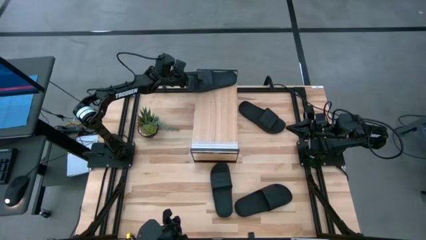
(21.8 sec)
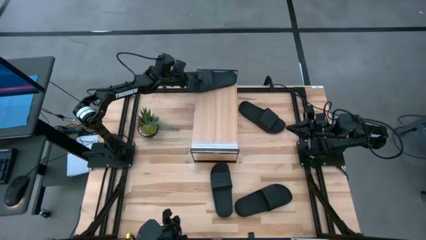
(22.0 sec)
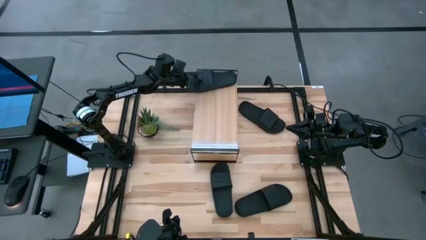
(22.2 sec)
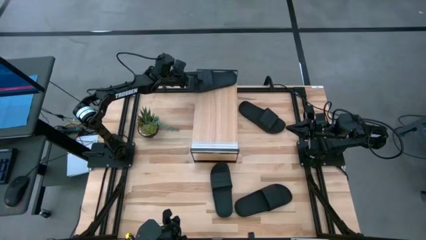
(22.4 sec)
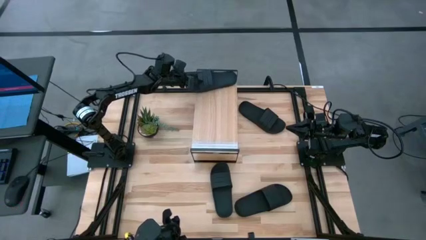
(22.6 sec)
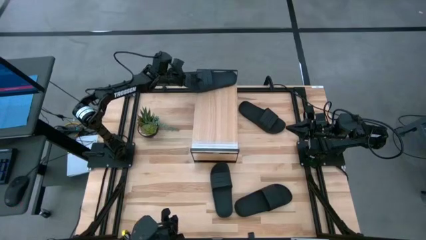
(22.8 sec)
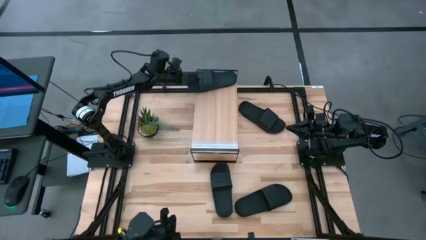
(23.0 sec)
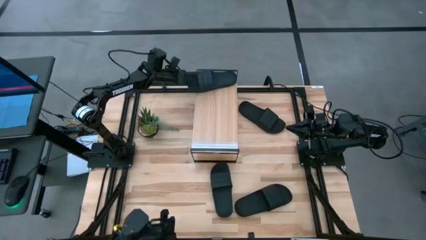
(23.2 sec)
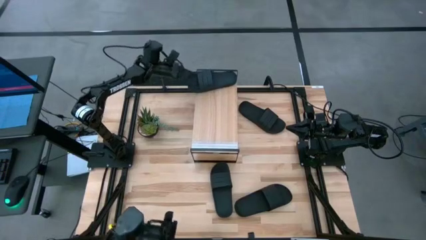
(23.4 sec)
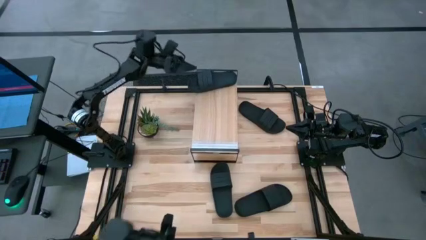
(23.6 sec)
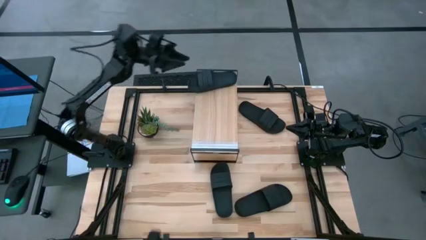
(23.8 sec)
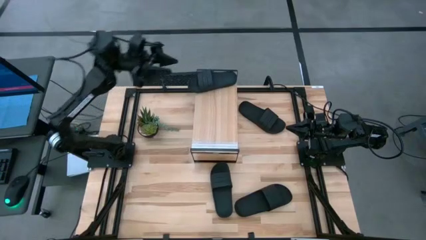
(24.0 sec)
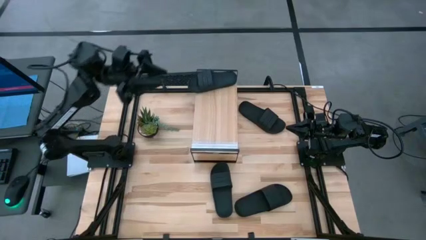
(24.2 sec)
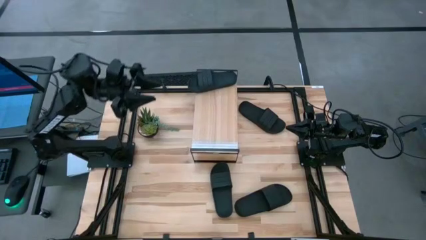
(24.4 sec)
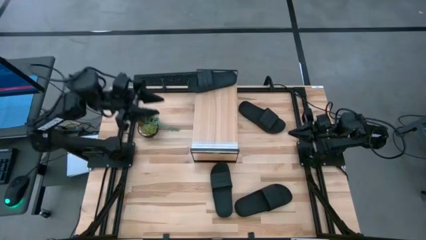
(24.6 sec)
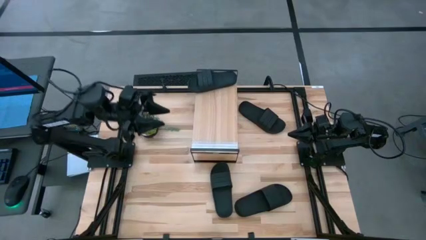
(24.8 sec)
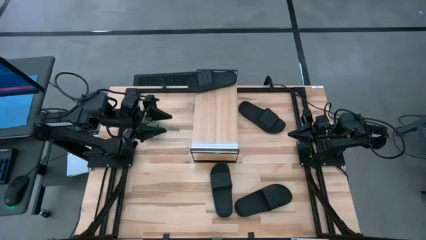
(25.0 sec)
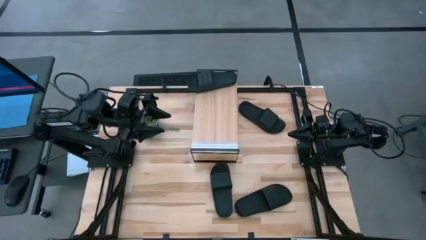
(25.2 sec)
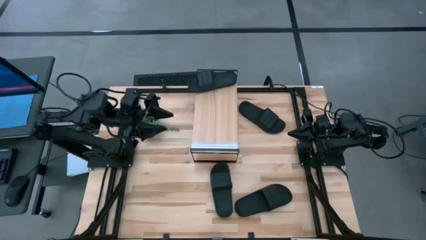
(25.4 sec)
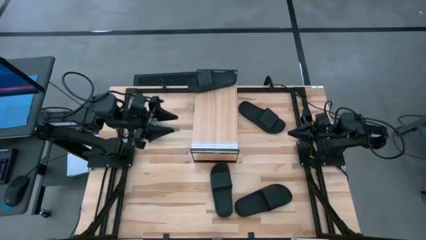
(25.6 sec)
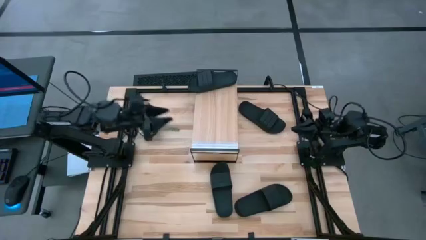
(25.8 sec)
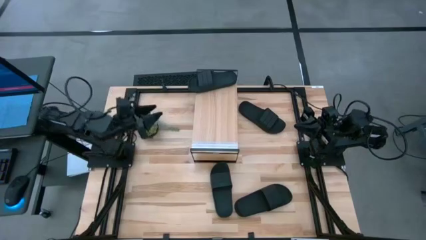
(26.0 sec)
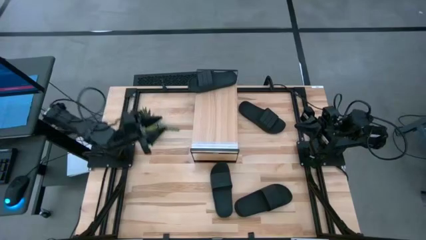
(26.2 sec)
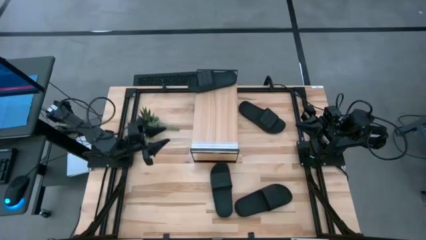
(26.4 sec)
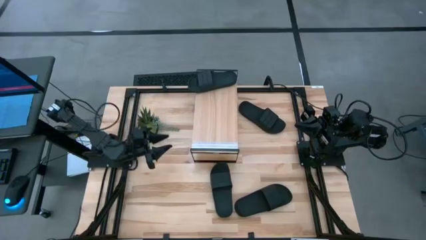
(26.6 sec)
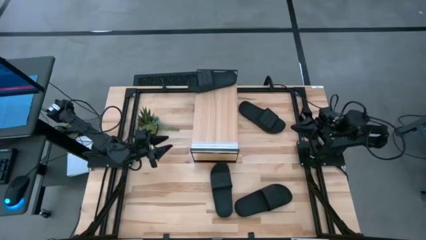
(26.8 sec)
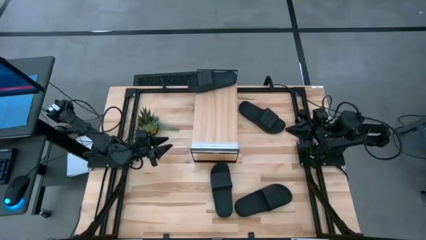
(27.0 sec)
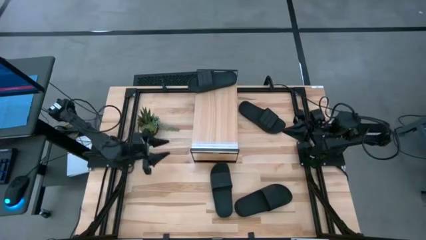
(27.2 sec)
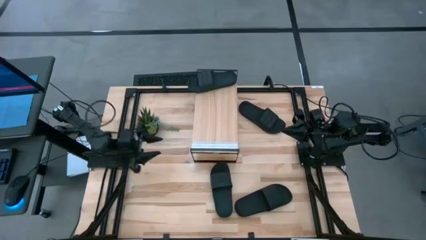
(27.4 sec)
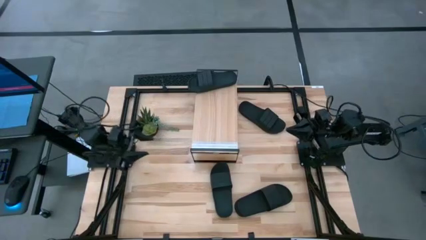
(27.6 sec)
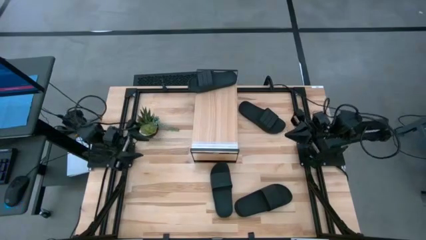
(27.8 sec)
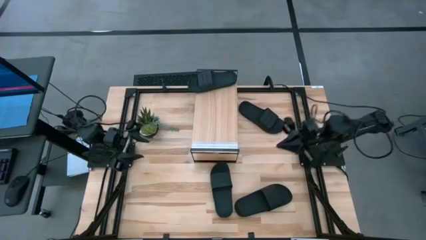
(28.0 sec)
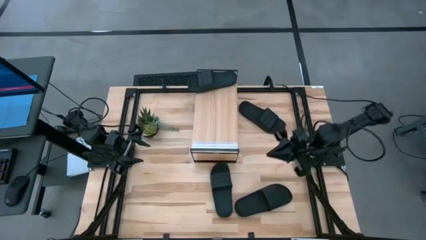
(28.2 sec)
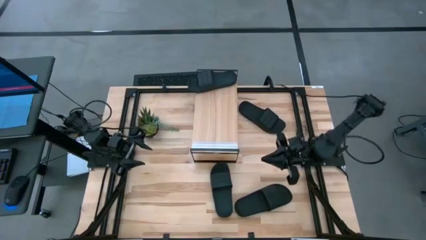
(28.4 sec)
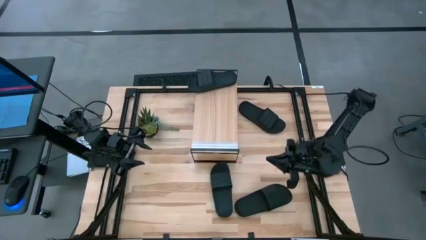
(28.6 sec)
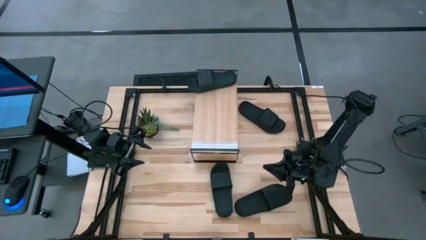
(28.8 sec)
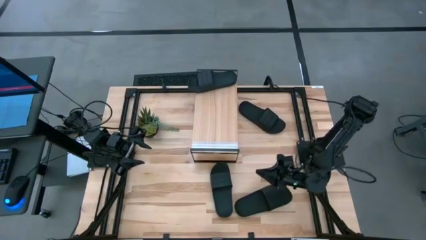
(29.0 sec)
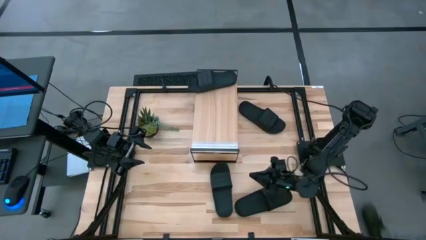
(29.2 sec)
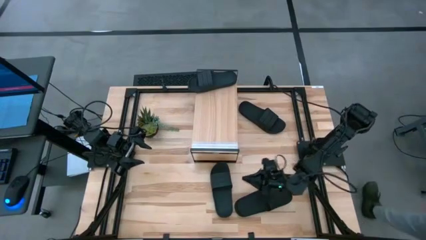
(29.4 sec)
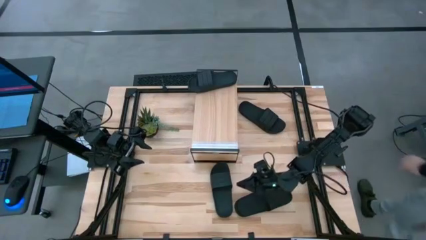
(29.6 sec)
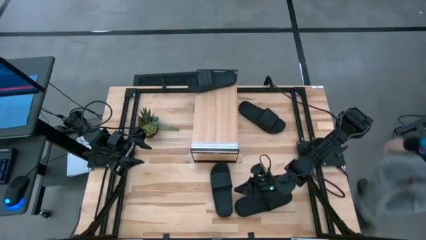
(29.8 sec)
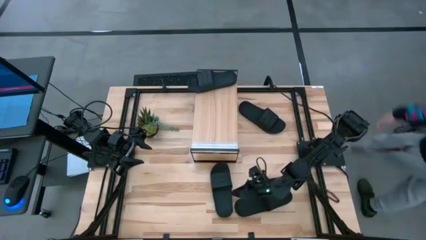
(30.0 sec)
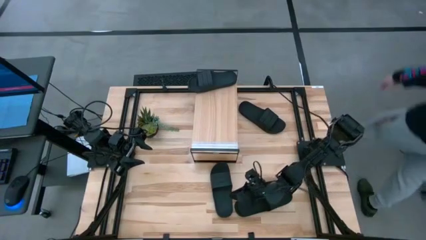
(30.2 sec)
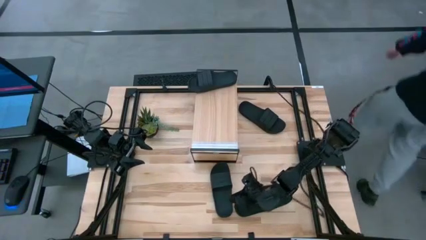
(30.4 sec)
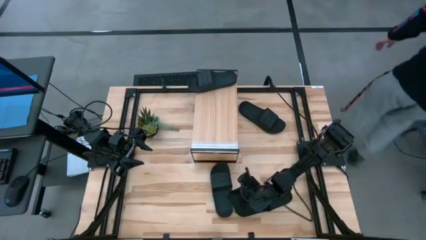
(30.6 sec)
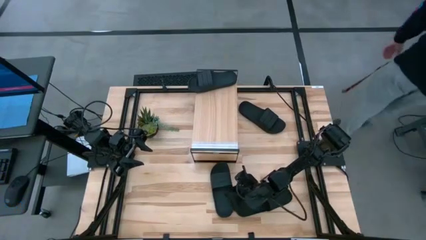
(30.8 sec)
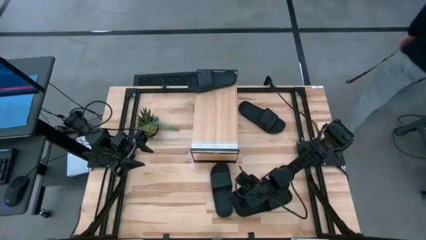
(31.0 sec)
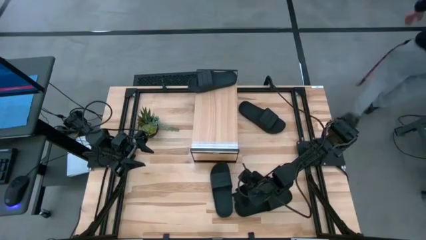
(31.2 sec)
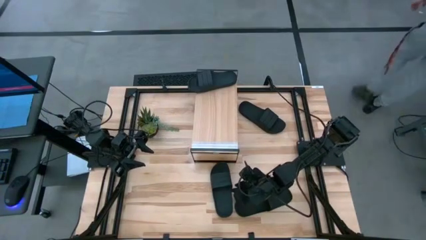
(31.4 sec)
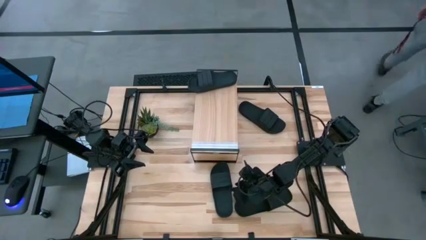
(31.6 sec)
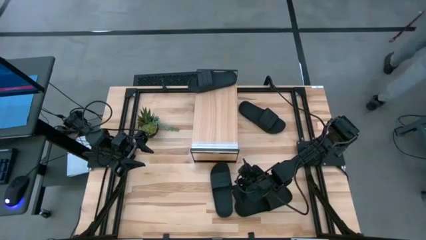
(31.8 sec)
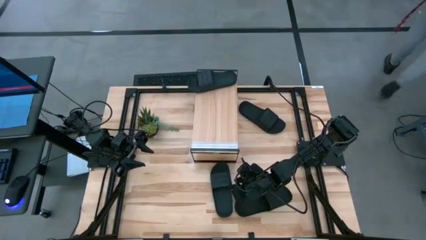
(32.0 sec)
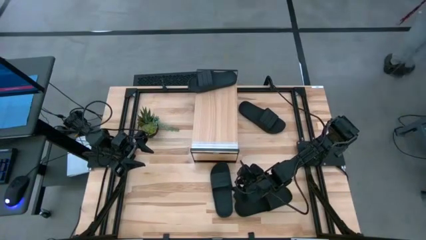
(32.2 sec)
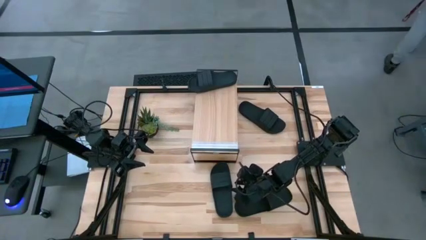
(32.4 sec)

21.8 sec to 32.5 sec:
Task: Pick and place slides into the shelf
Put the bottom left black slide on the shelf
